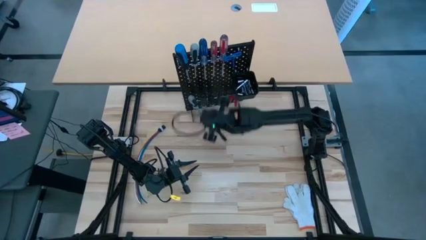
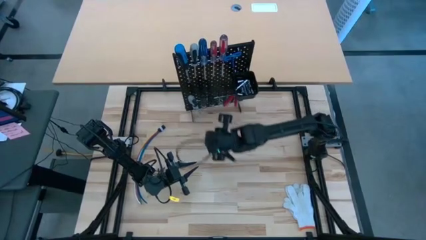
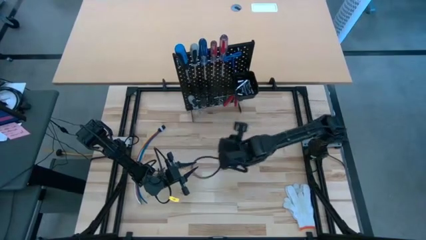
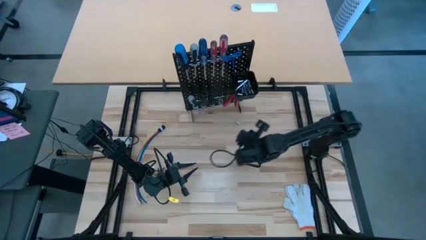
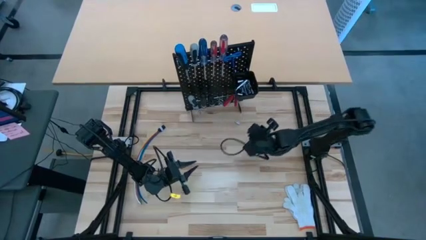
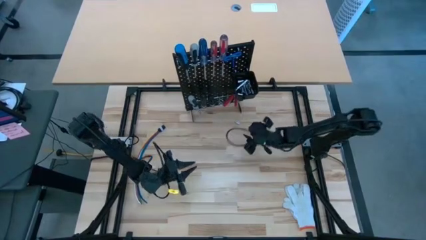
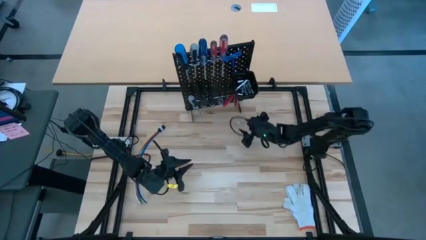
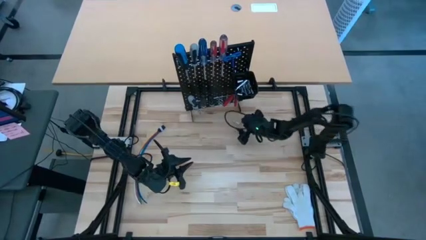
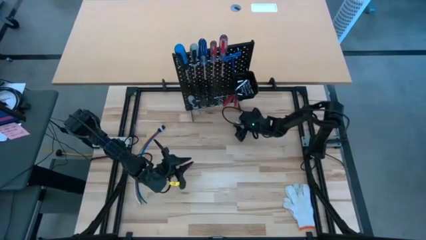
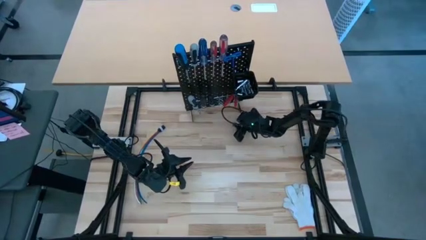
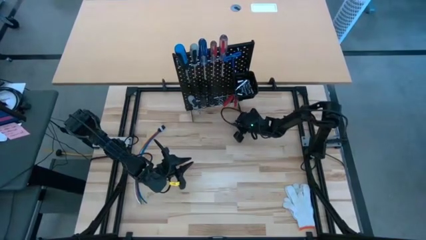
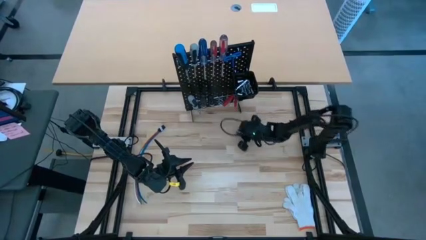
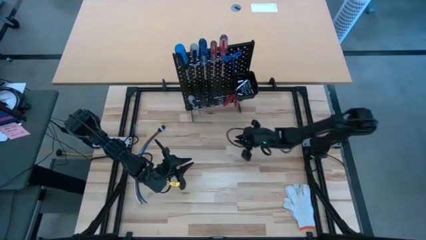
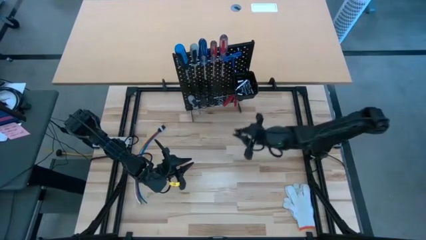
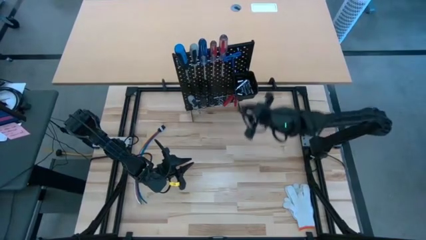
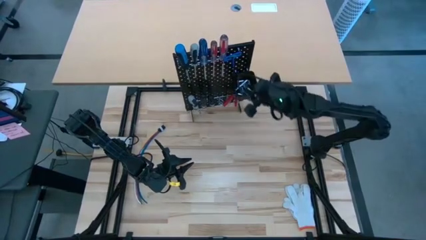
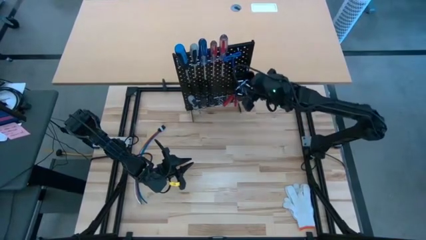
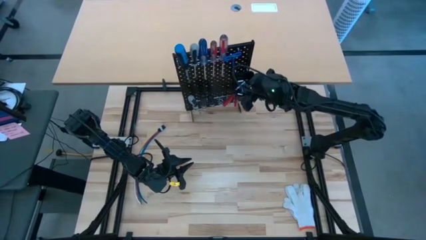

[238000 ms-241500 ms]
Task: Hang tools onto peg board
Put the socket into the black bin on the pegboard

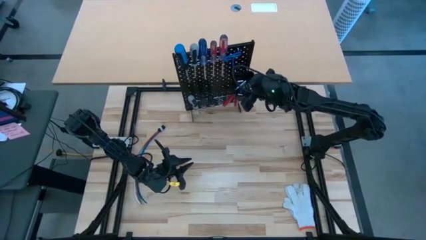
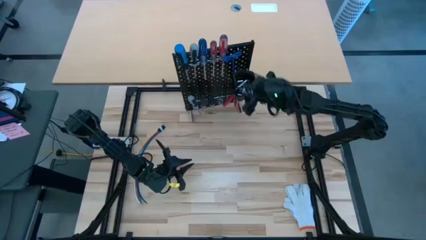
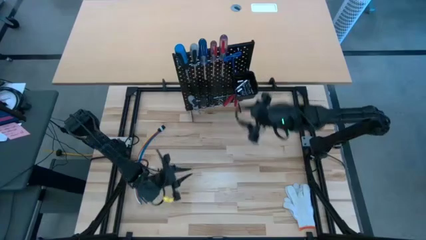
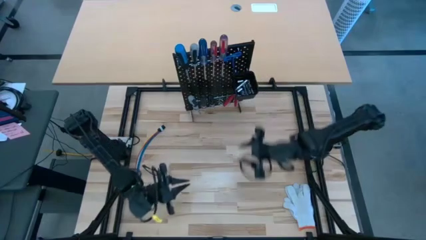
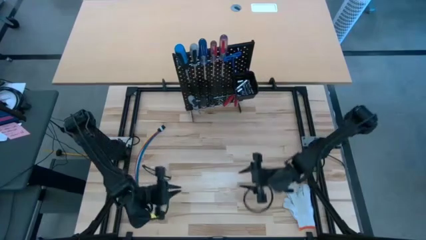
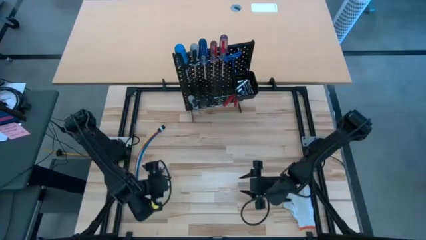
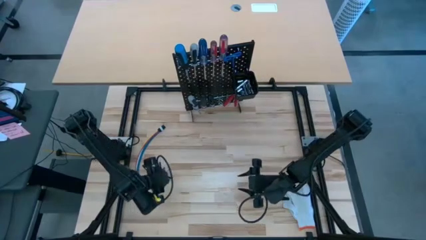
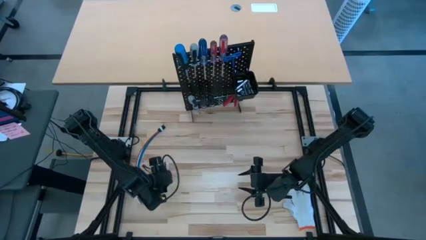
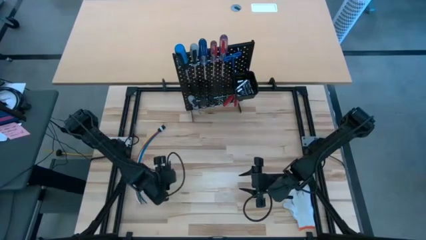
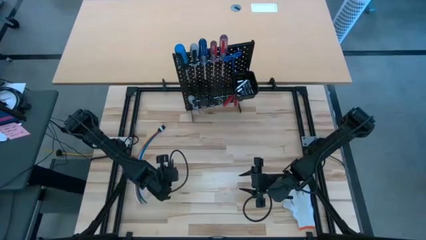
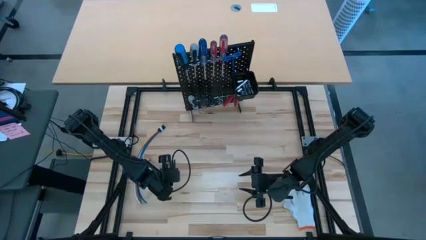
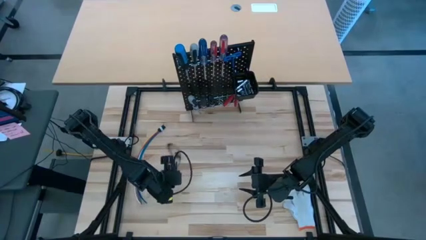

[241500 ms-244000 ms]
Put the safety goggles into the black bin on the pegboard

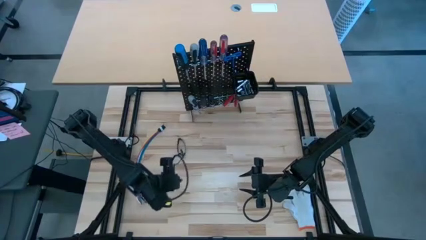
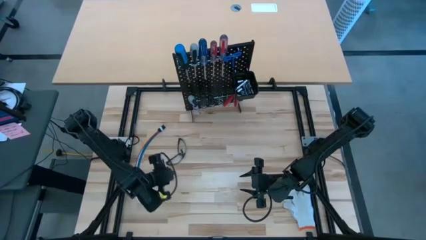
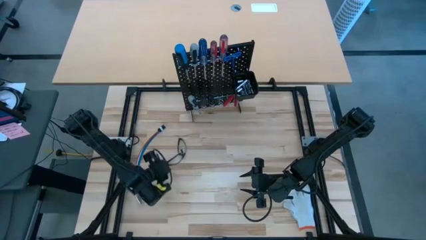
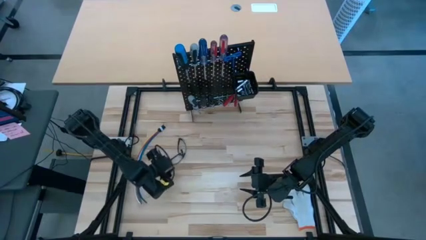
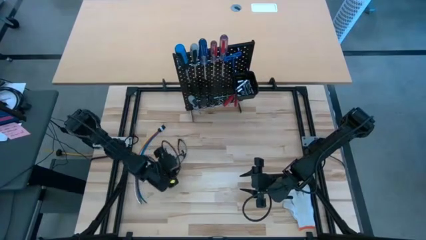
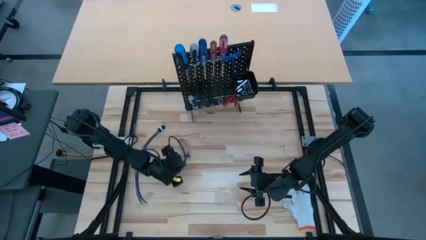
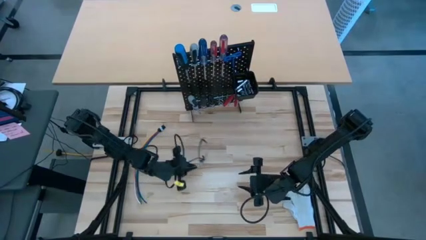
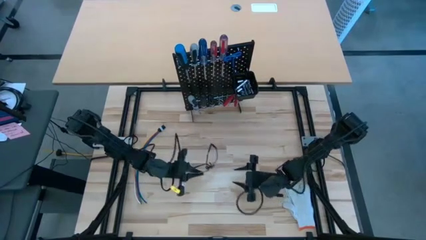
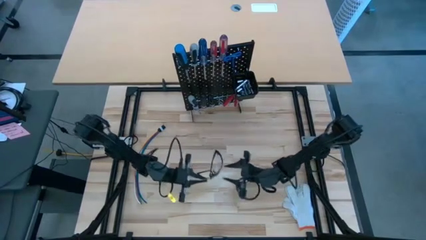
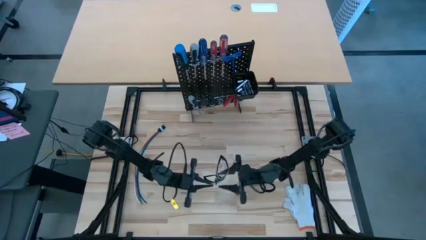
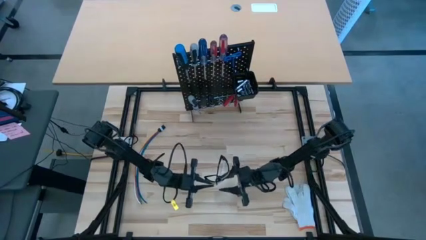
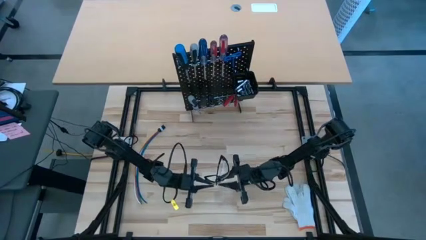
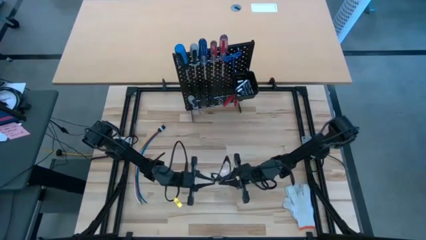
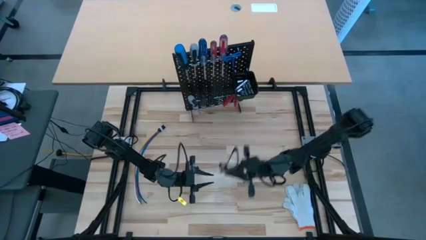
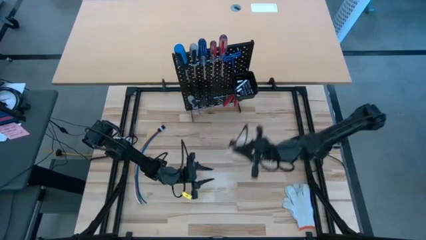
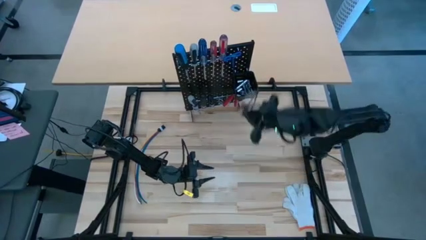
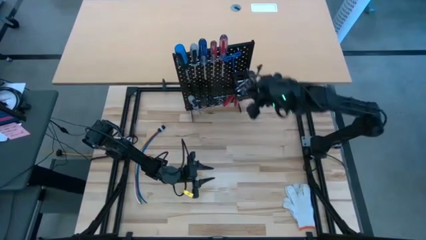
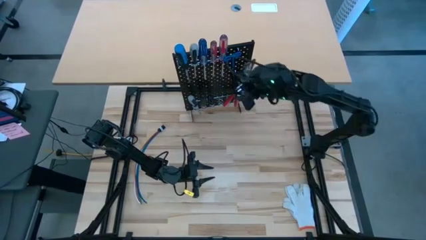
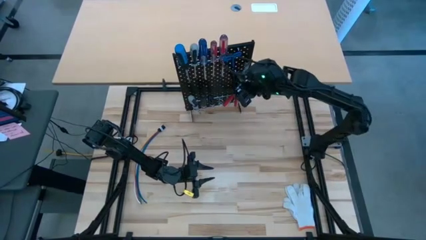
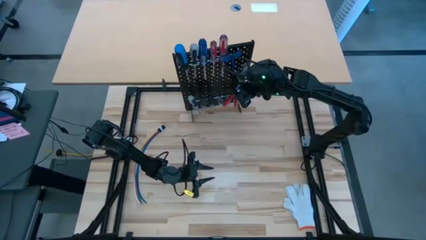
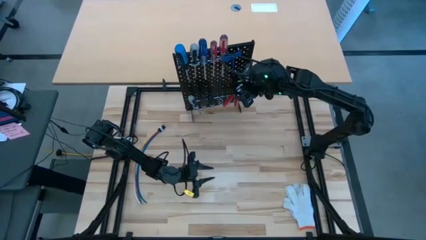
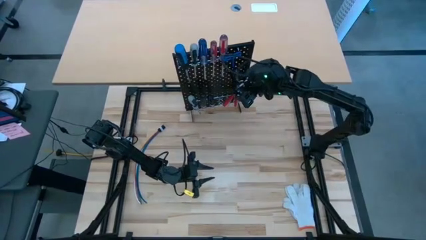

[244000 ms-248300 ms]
Put the safety goggles into the black bin on the pegboard

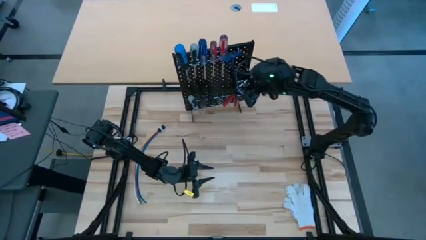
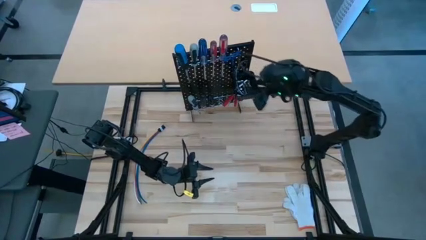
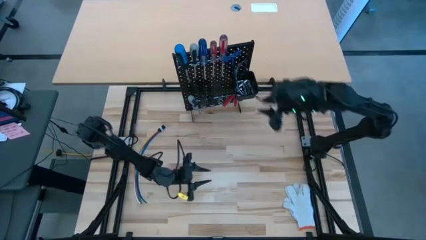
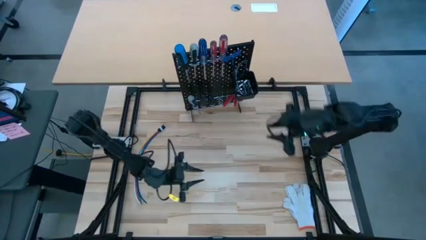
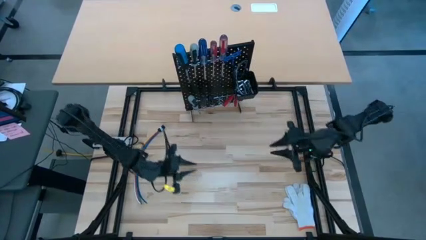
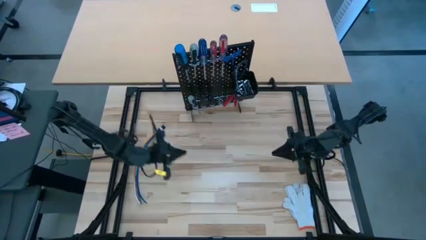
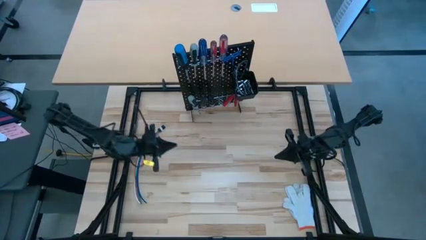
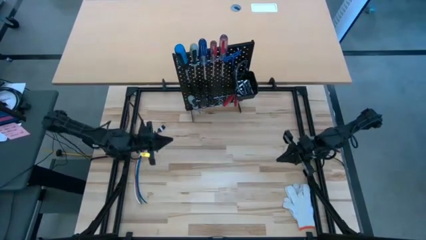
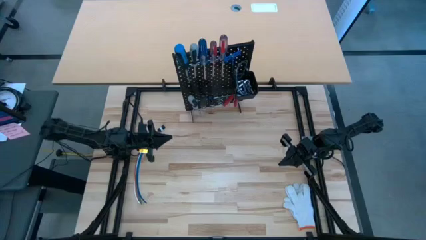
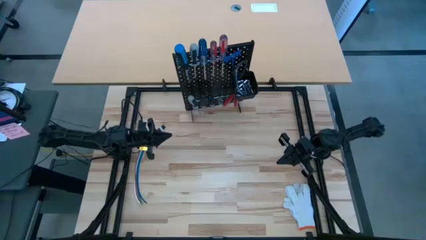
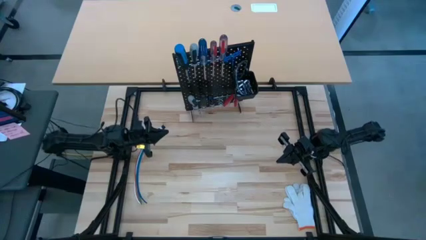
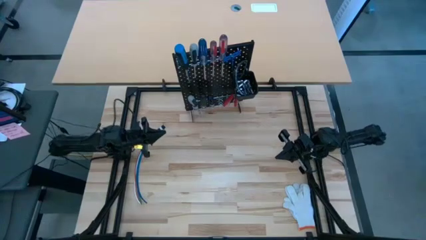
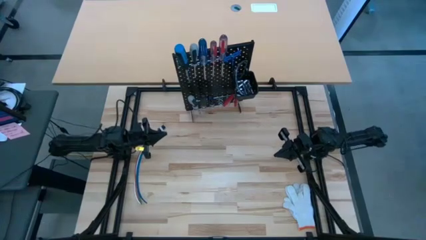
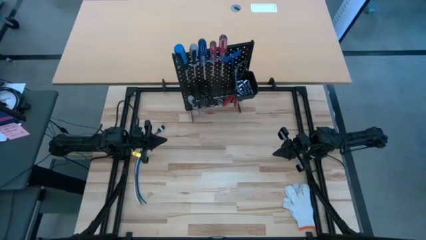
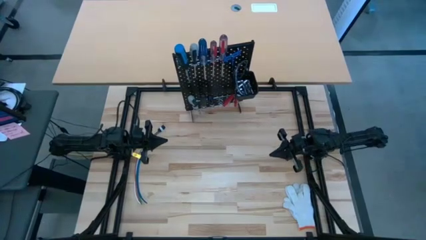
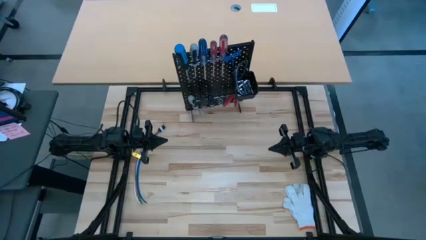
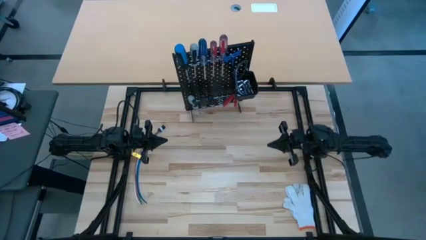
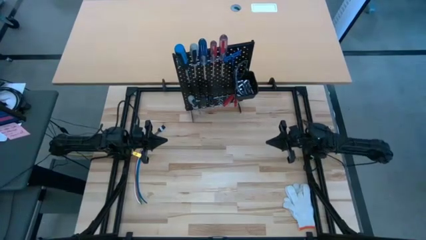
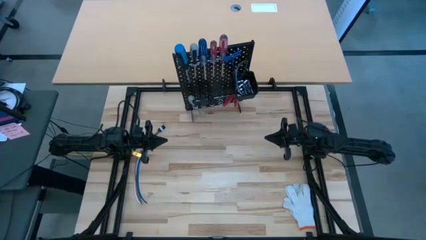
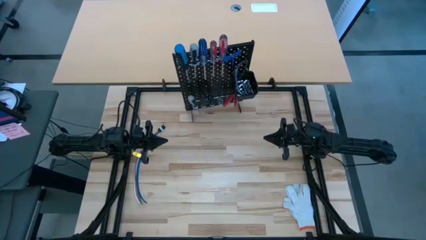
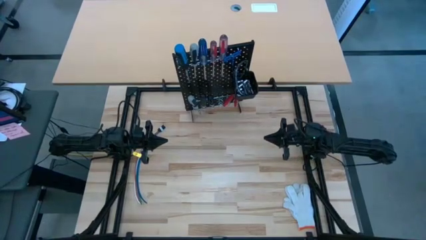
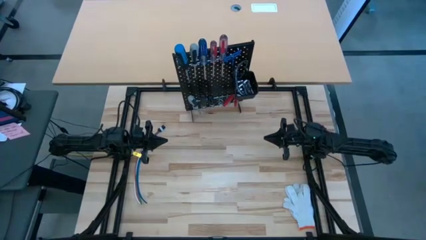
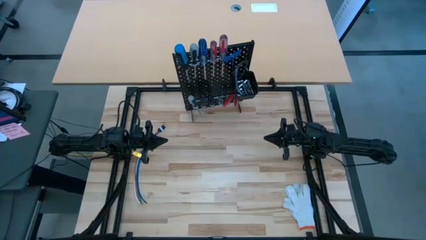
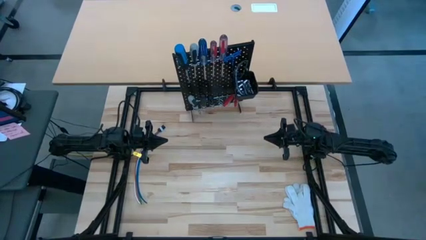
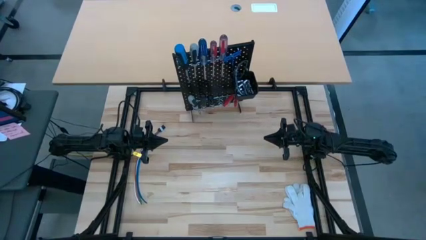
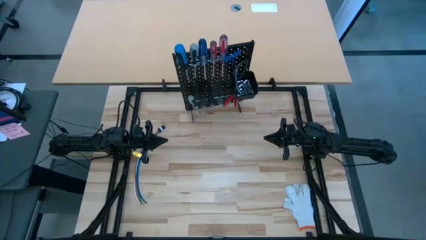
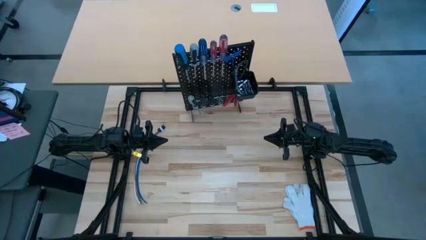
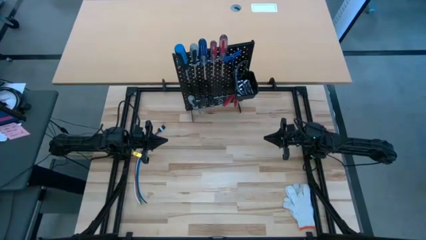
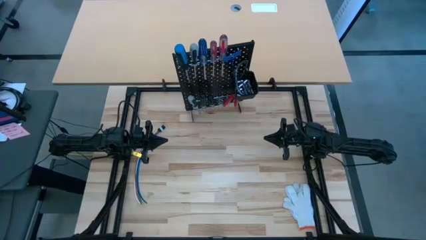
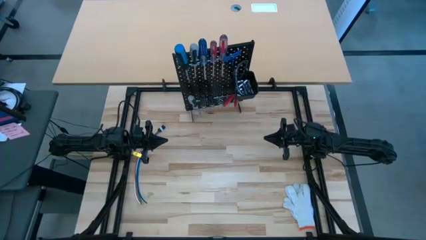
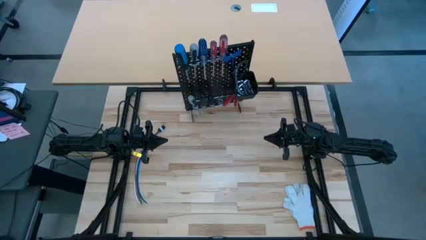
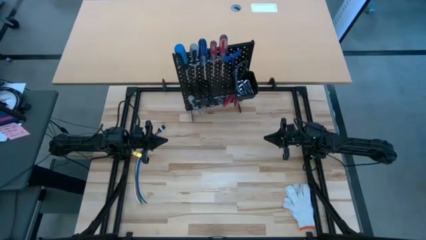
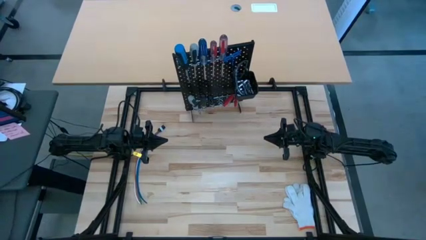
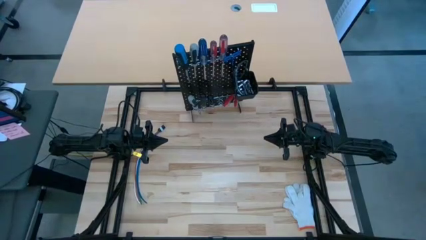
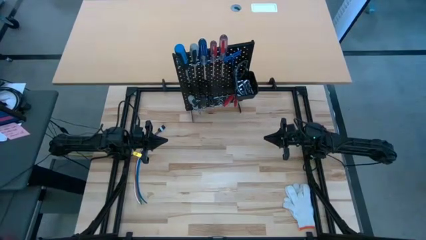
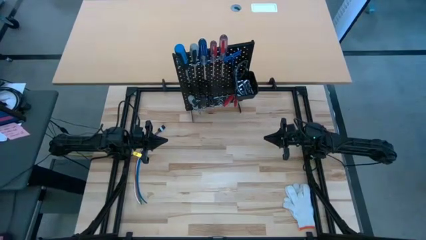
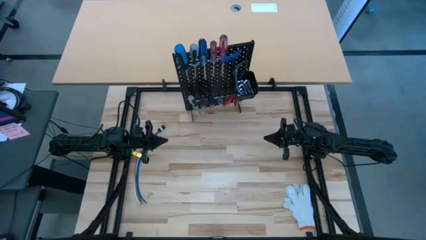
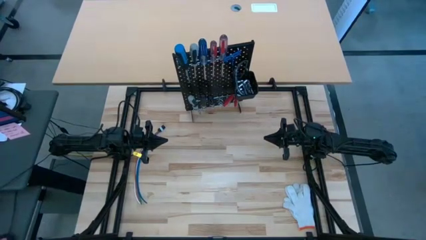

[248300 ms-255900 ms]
Return to Home Position
